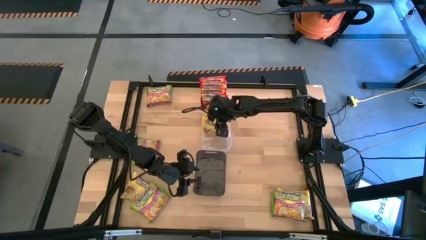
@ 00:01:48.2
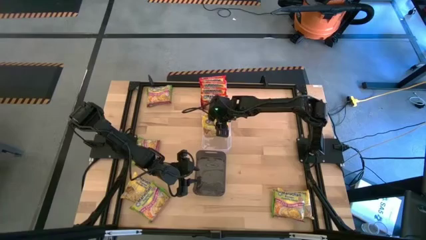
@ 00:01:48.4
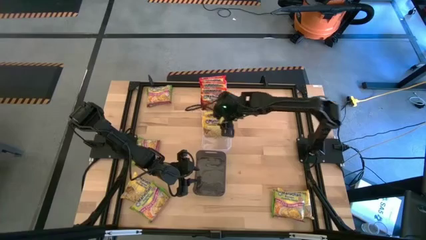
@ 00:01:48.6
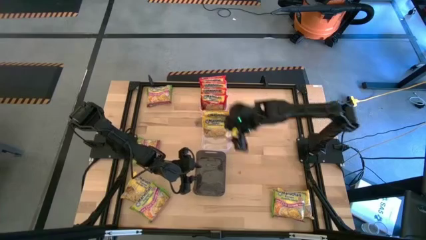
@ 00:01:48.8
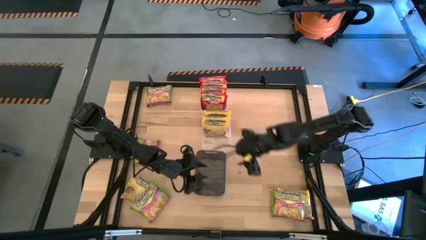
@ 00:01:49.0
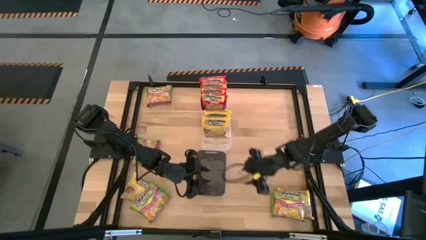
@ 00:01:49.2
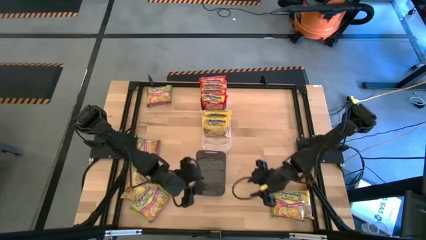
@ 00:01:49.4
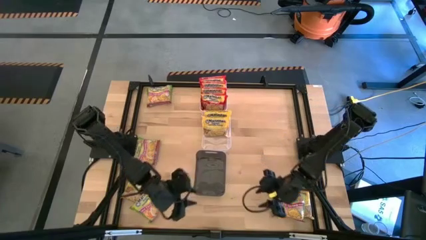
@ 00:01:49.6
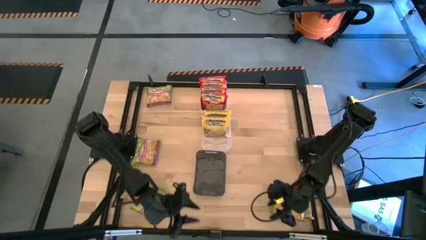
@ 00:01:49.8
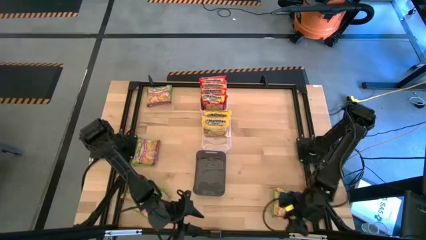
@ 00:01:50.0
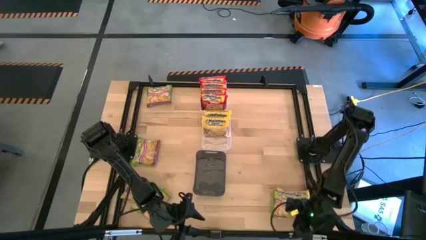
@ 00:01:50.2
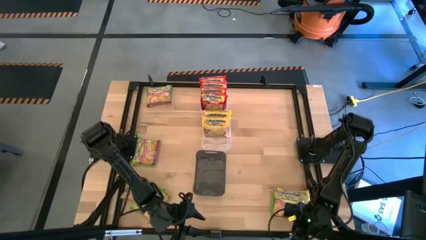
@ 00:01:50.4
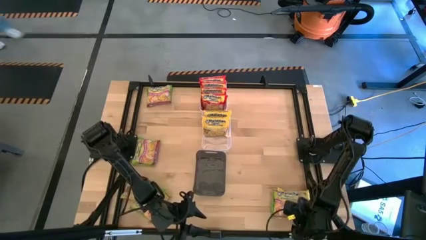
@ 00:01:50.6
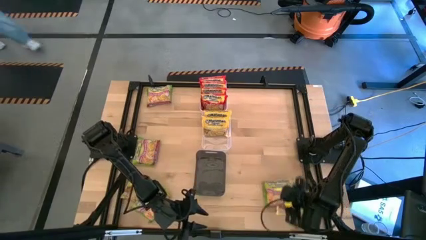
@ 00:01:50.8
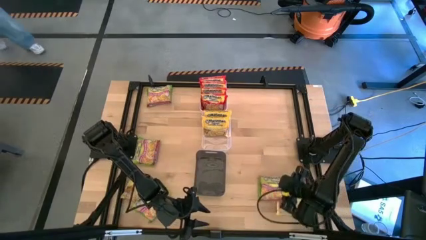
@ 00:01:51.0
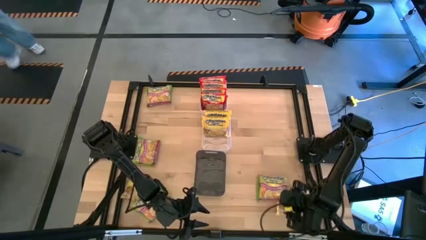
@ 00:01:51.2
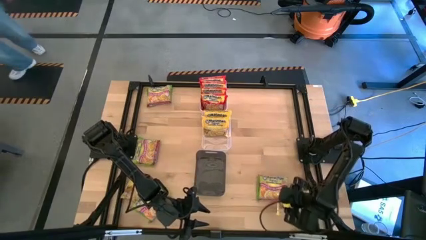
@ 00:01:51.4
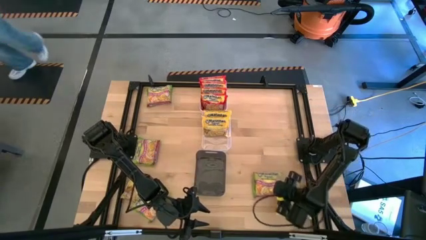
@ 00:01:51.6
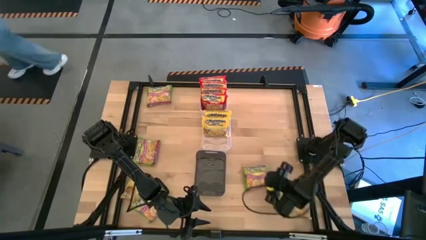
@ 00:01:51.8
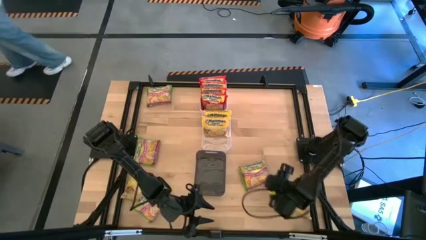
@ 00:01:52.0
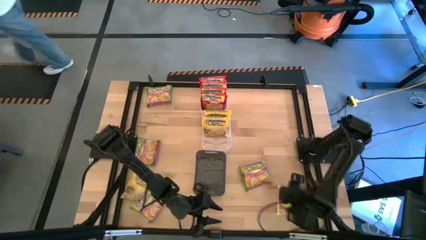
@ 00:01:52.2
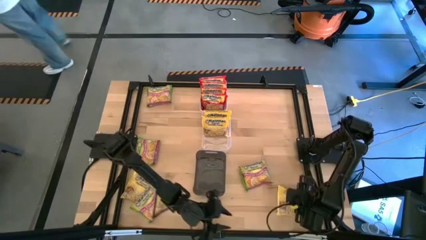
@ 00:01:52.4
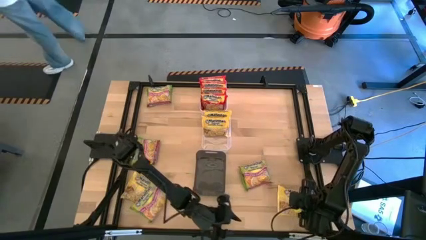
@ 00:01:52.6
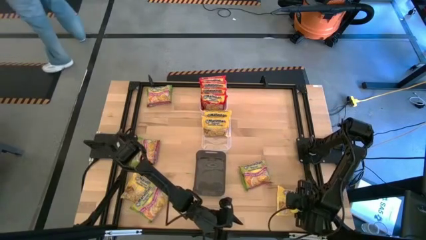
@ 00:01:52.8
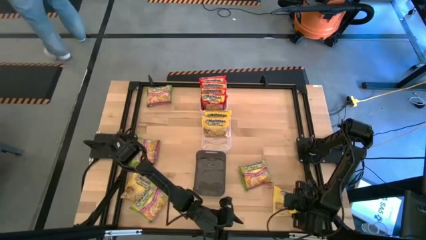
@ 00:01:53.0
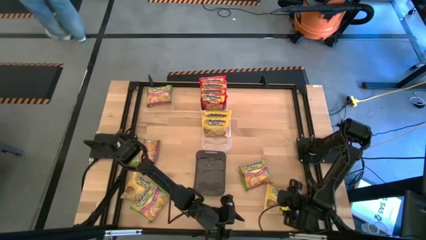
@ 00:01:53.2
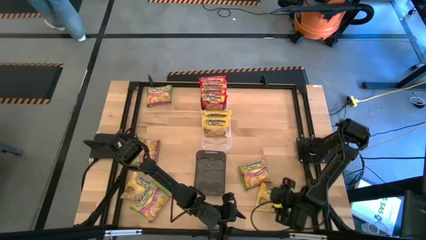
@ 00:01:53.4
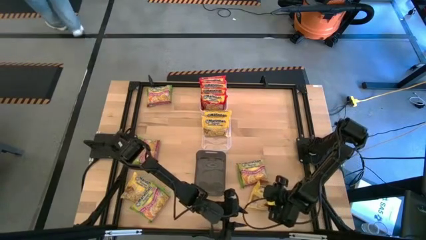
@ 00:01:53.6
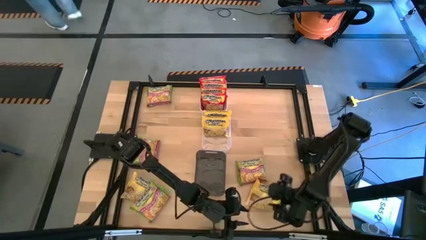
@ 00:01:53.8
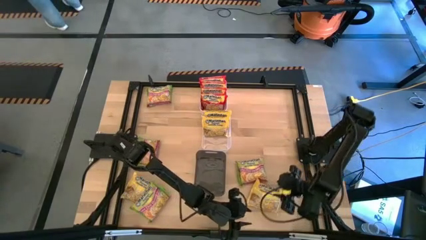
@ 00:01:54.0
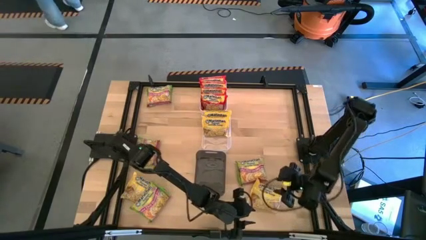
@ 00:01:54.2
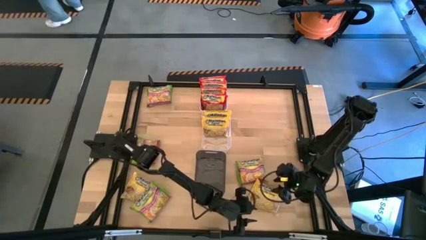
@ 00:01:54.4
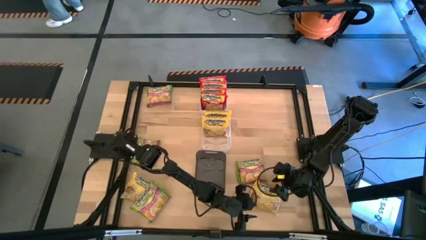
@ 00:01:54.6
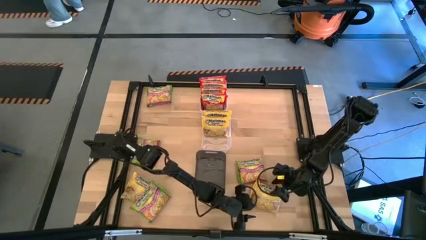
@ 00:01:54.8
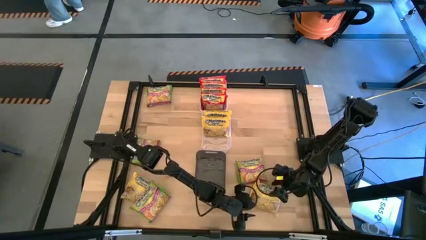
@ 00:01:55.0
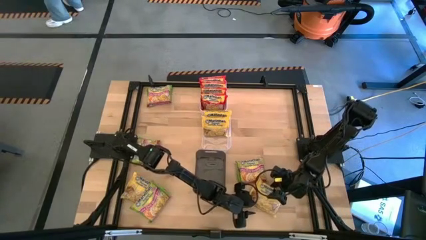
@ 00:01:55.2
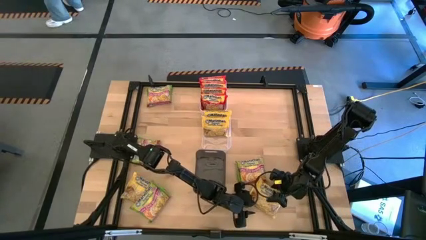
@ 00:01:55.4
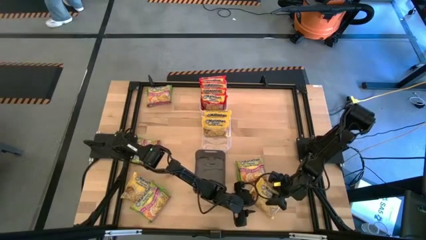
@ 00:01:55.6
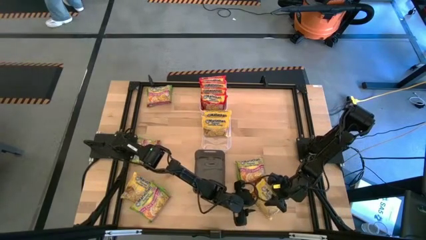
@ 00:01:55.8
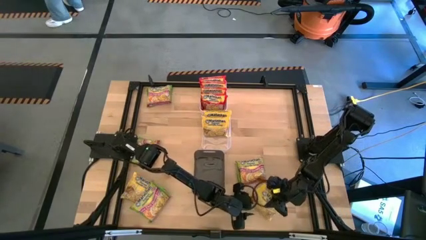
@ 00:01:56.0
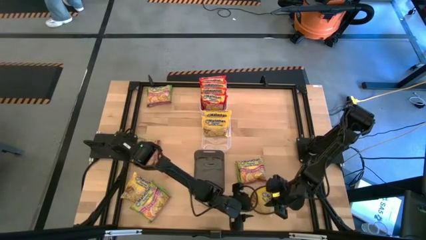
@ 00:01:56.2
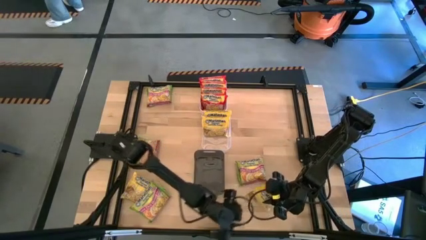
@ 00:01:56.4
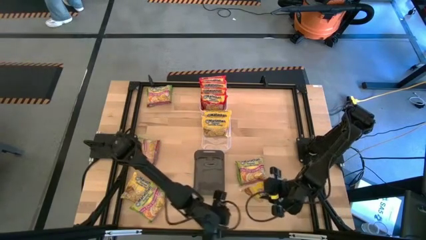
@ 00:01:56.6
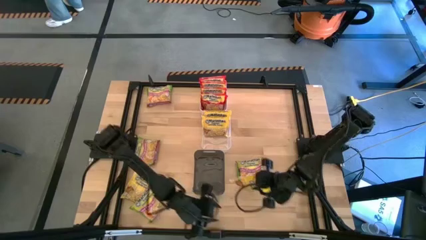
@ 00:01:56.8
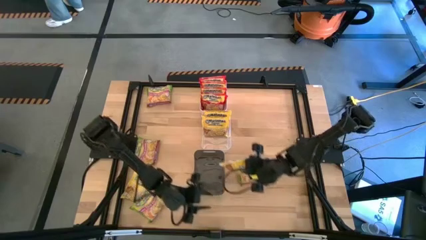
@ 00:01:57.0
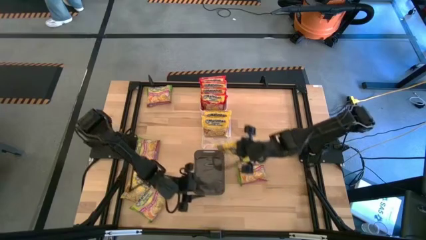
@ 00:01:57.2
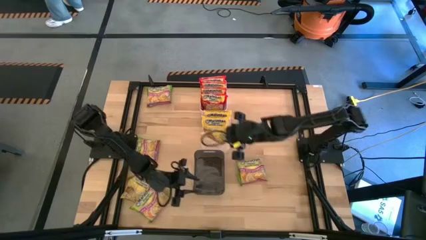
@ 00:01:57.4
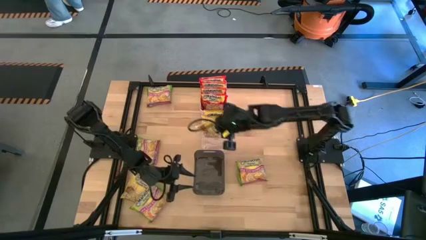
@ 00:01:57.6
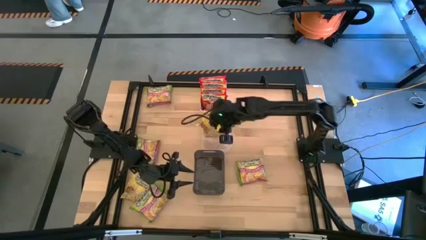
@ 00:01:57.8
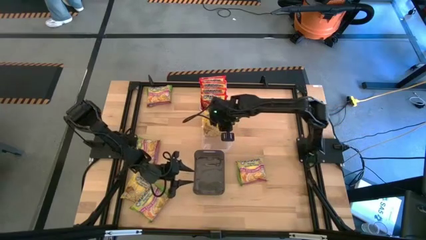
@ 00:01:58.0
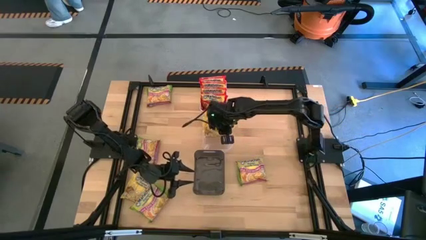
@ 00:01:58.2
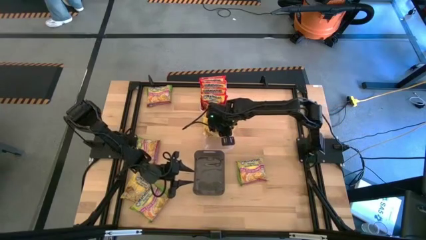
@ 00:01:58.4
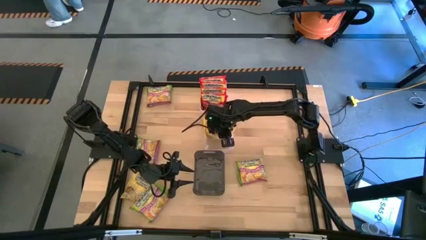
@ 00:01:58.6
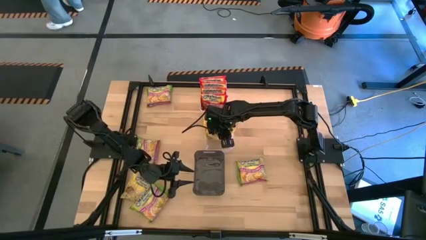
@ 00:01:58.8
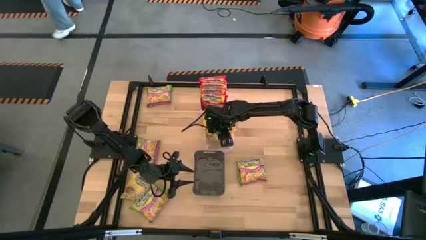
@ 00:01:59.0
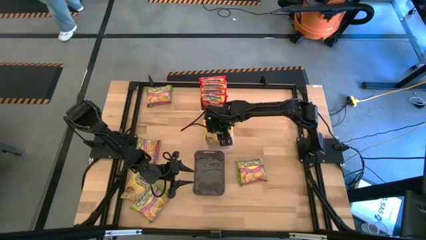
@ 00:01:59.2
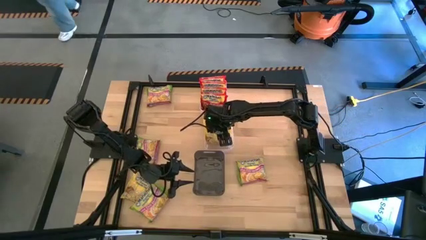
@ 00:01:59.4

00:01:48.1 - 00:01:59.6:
Task: Sort Maruchan noodles
Put the yellow noodle pack into the transparent bin
